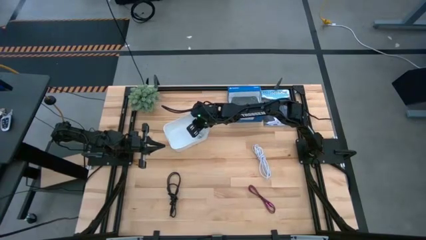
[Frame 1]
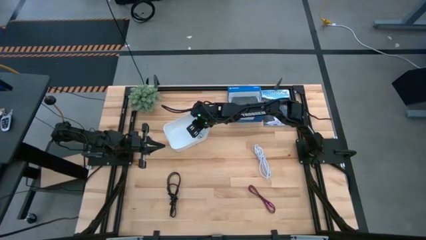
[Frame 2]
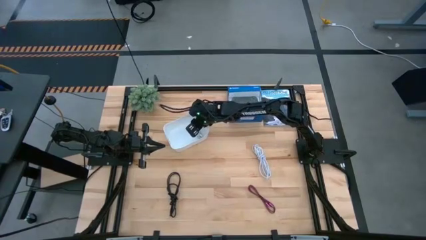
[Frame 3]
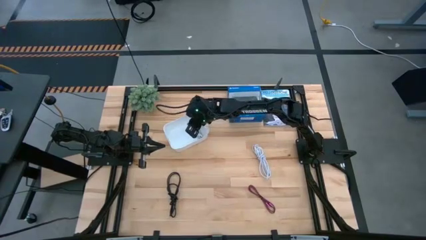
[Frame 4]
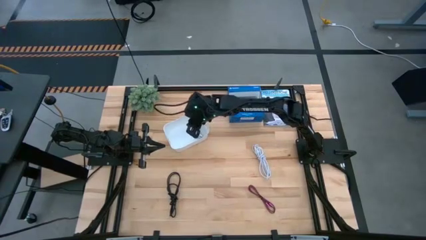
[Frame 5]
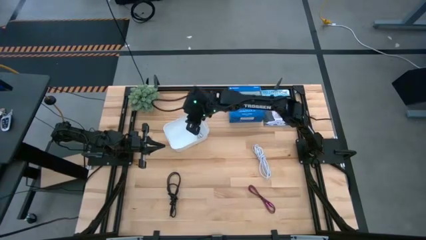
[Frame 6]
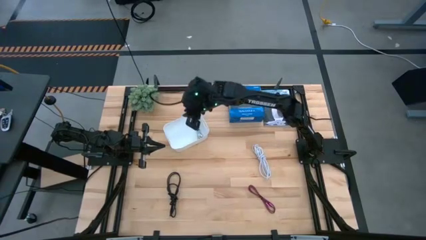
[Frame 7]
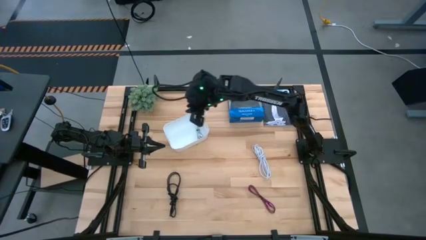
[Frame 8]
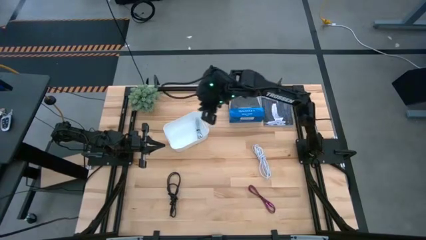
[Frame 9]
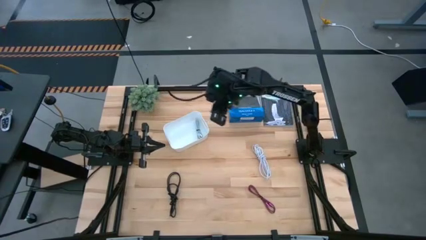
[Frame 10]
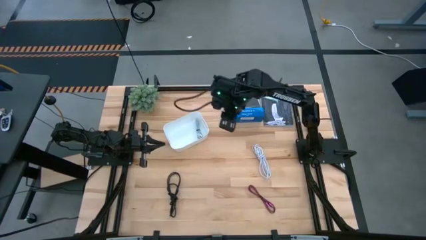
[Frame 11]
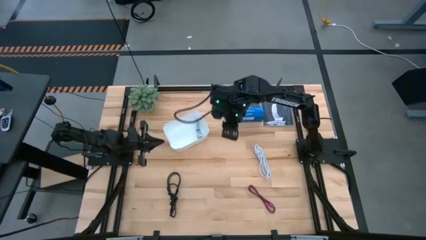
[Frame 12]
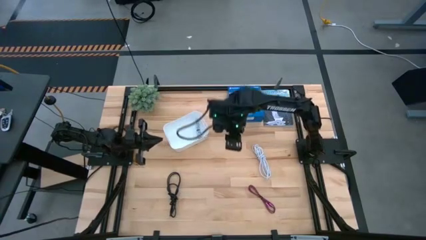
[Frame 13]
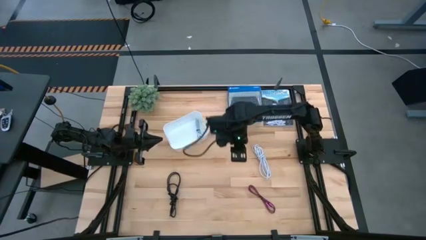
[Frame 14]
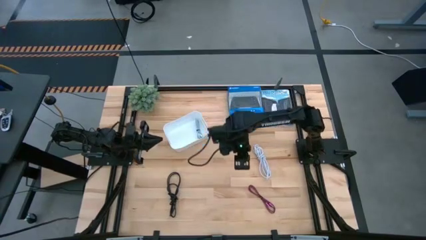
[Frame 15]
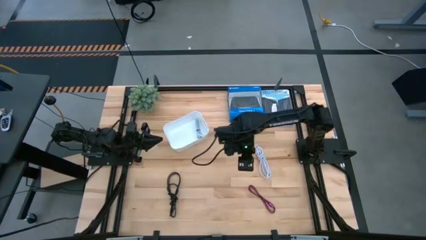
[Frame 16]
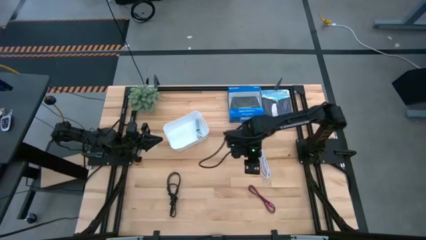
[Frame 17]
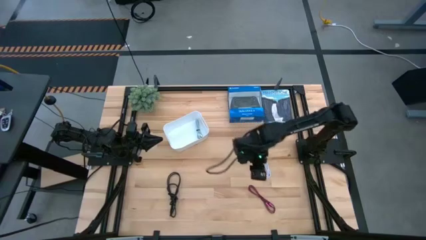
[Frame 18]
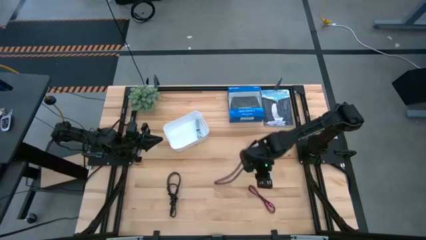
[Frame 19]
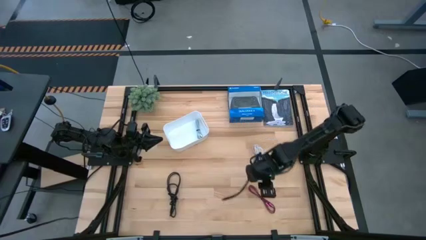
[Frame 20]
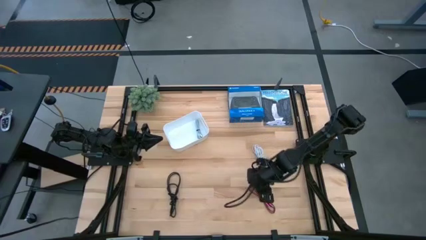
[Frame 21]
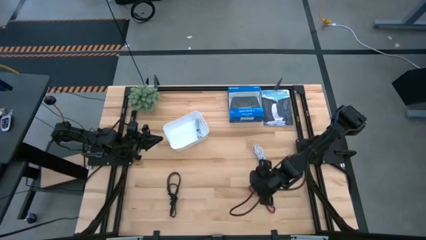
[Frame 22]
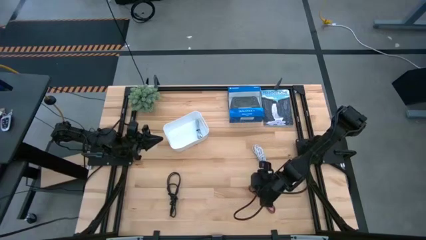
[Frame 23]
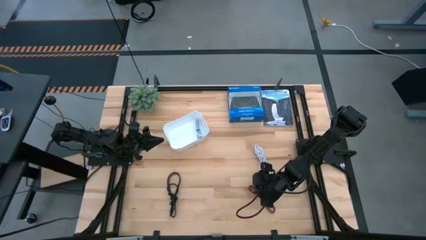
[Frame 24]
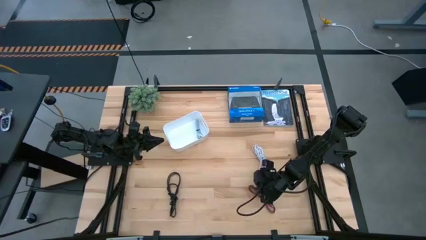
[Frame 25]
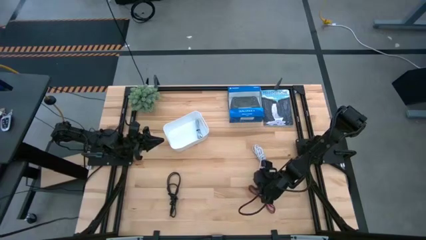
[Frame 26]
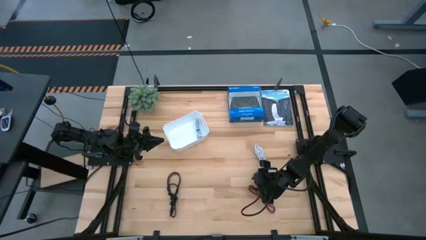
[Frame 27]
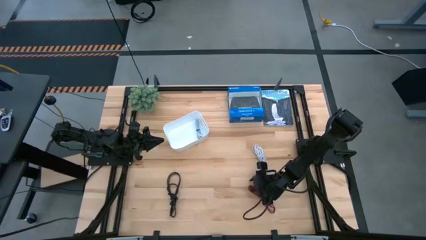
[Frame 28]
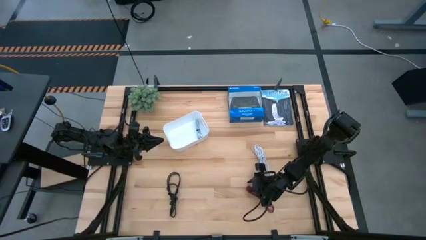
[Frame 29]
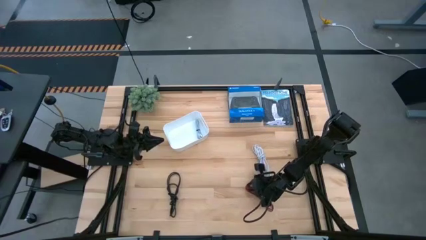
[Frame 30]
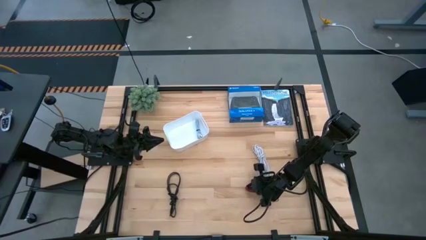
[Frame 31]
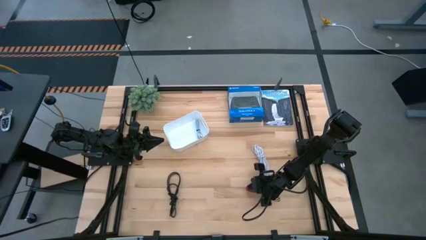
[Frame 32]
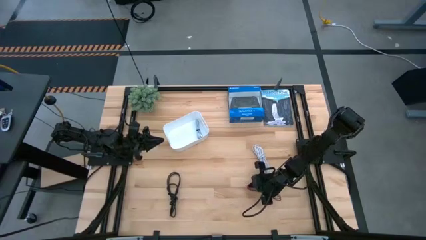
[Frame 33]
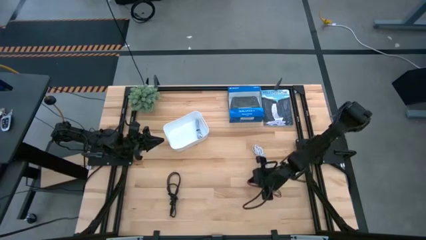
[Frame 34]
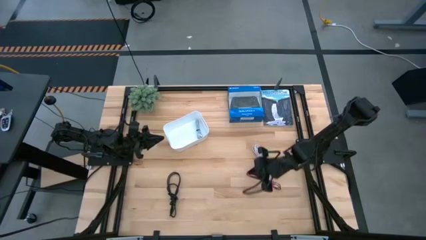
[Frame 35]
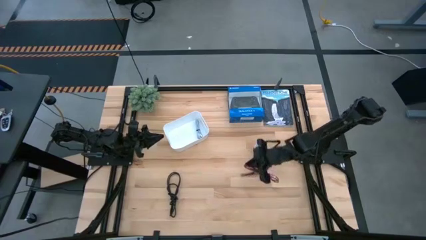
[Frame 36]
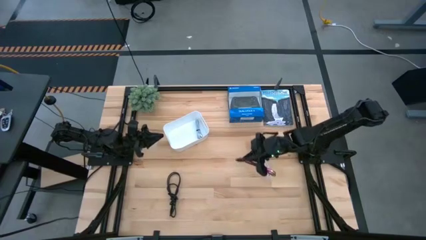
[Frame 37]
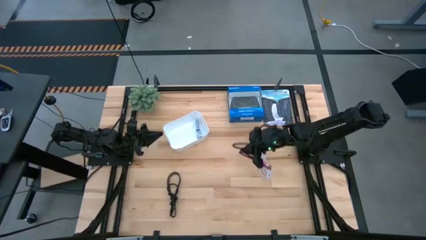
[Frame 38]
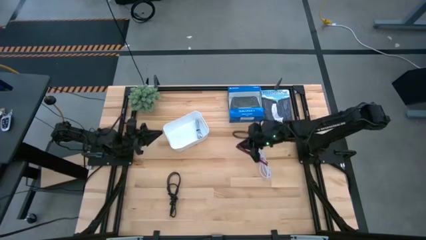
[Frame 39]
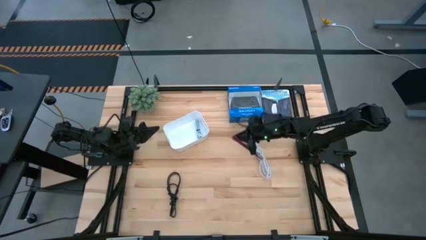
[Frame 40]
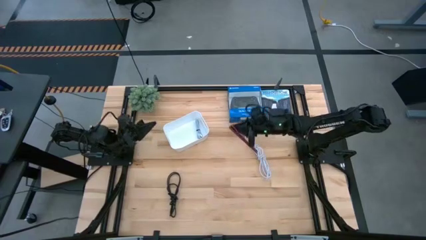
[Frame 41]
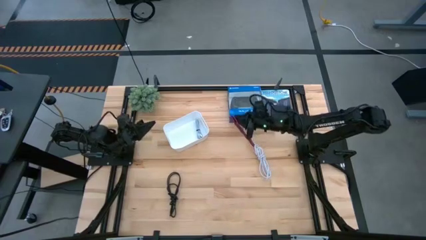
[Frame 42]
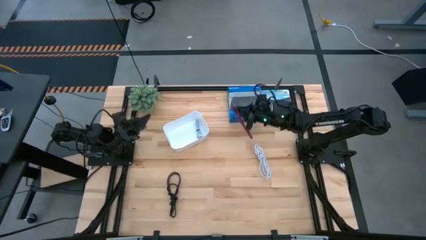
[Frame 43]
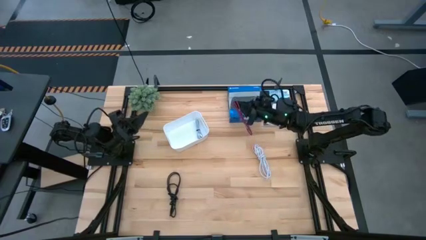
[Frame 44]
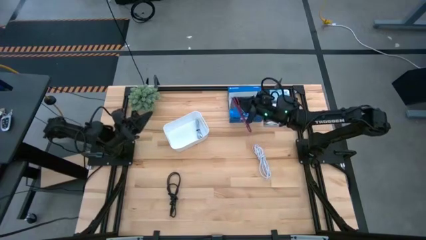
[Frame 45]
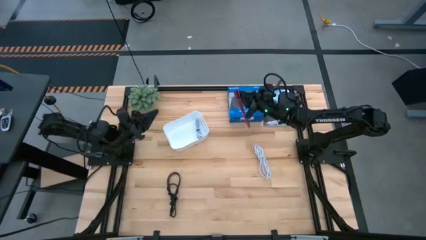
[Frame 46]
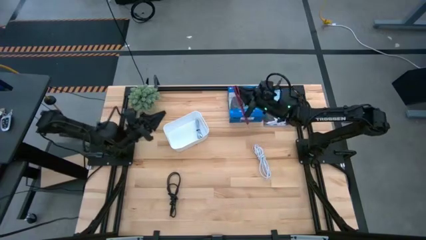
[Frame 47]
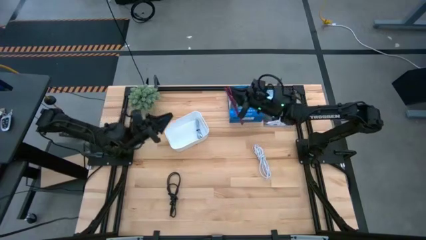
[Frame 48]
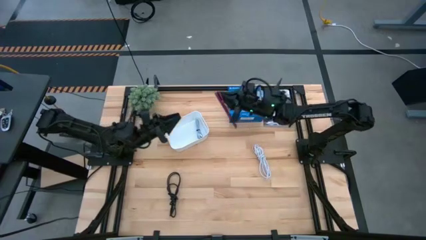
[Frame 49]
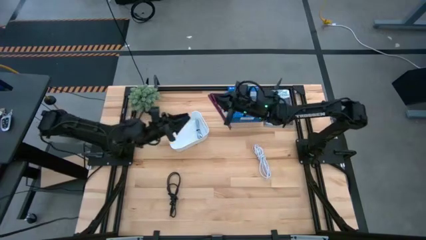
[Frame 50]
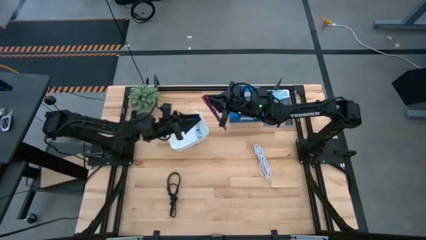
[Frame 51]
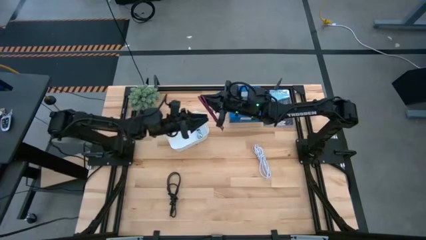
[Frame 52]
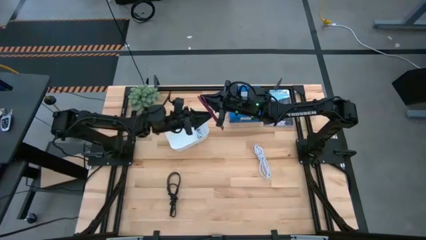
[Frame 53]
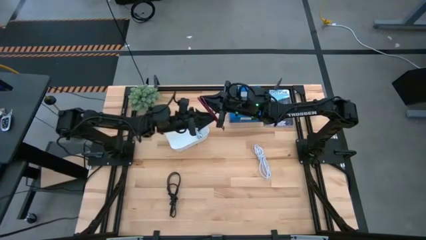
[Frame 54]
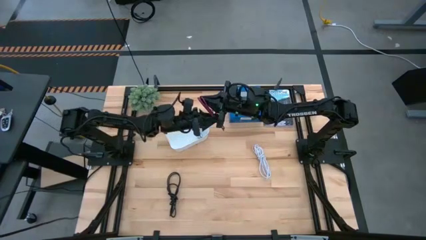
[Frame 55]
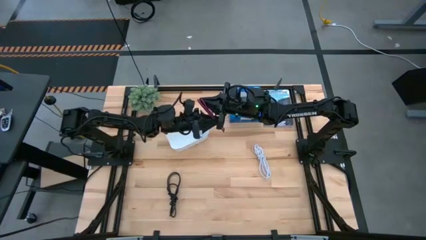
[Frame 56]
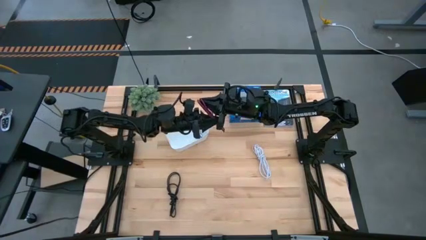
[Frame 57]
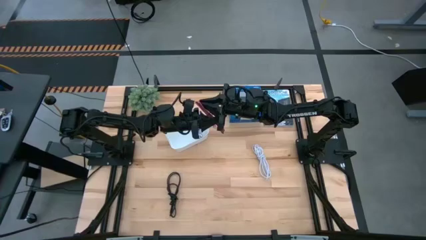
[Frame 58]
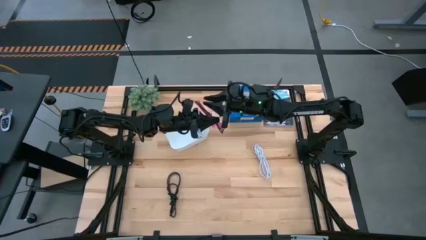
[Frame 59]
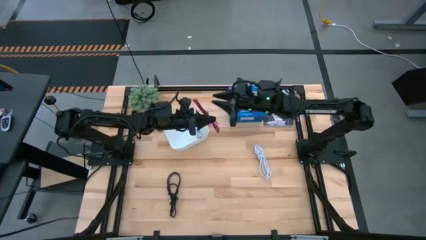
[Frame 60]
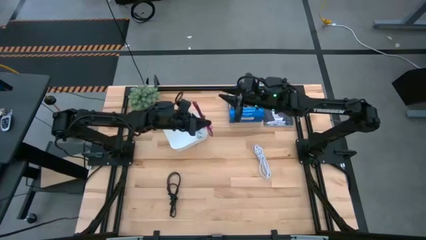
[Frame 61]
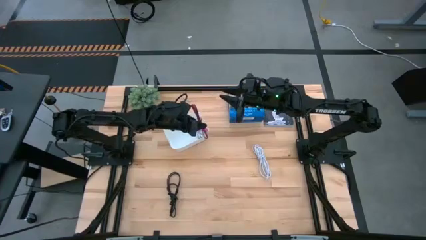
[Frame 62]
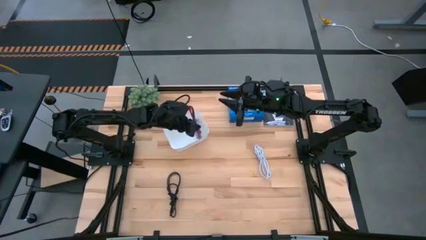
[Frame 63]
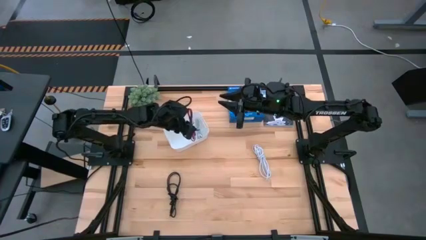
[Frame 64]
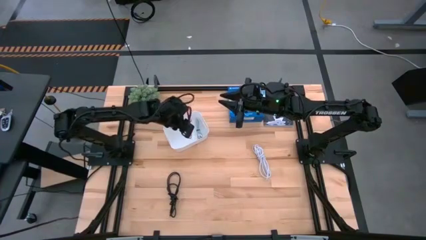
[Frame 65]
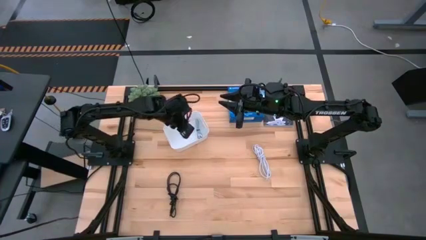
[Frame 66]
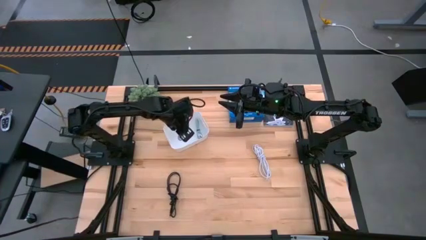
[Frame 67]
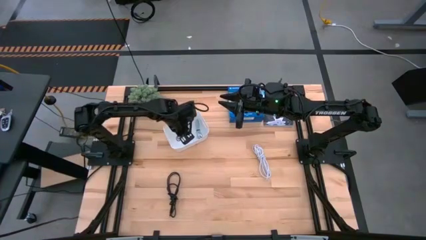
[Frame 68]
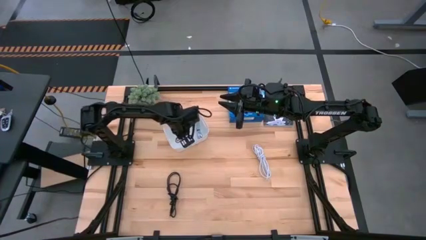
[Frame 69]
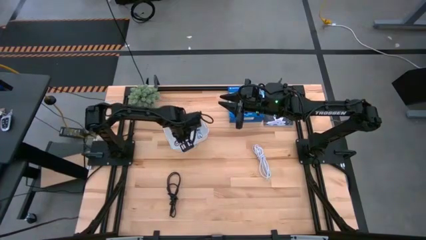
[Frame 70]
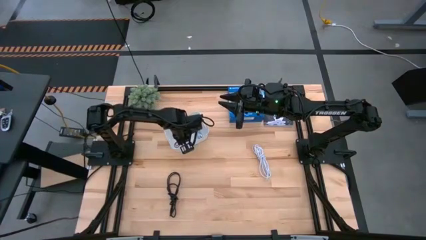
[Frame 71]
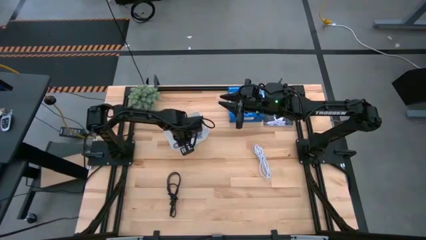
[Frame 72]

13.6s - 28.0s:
Task: Pick and place USB-C Cables
Put the pink charger cable into the white bin
